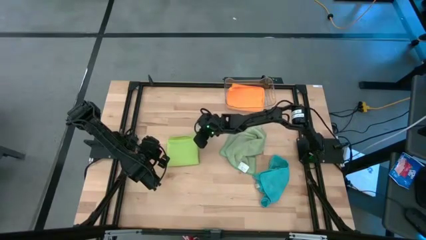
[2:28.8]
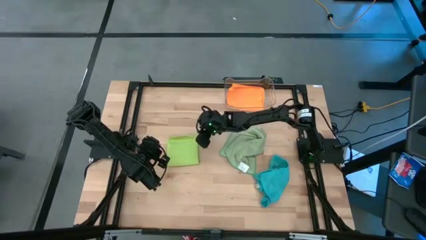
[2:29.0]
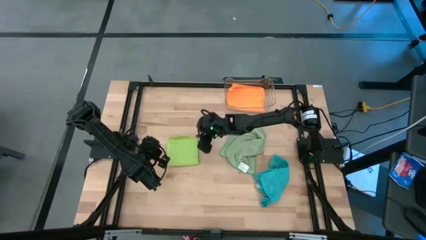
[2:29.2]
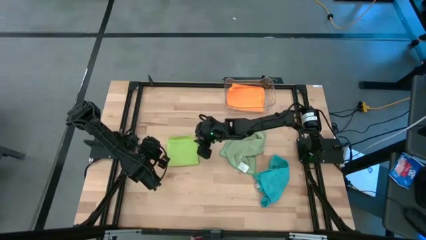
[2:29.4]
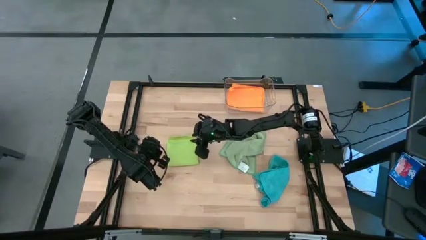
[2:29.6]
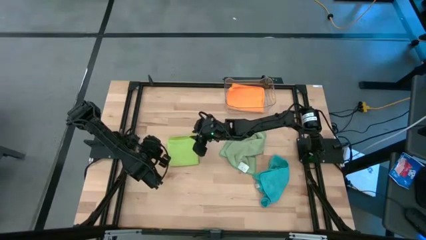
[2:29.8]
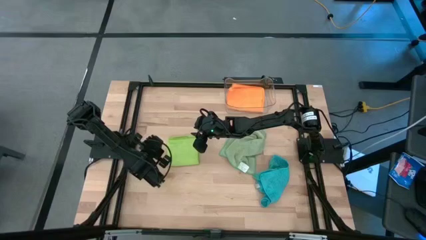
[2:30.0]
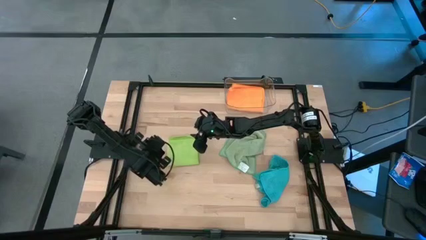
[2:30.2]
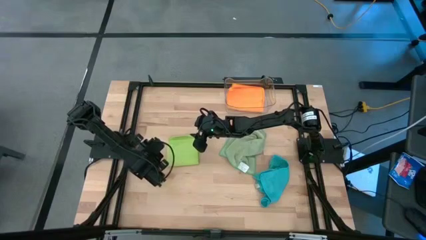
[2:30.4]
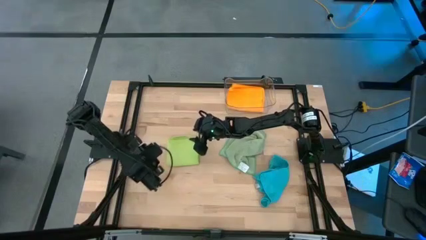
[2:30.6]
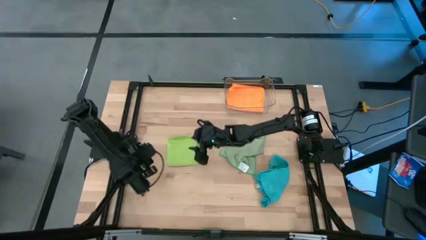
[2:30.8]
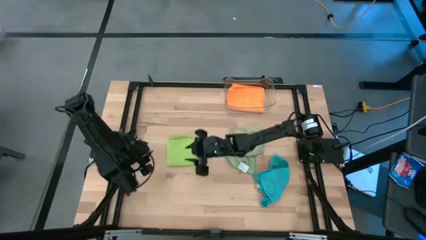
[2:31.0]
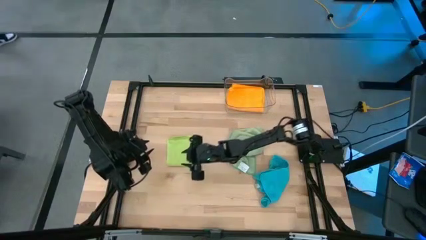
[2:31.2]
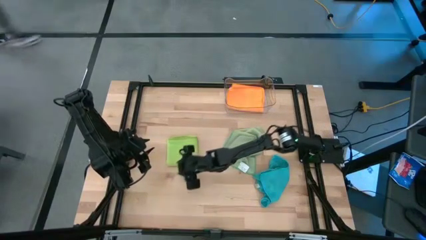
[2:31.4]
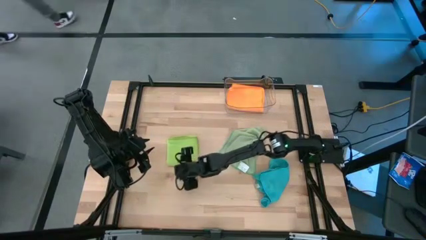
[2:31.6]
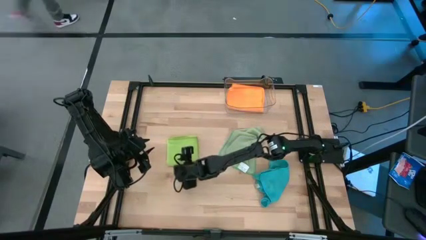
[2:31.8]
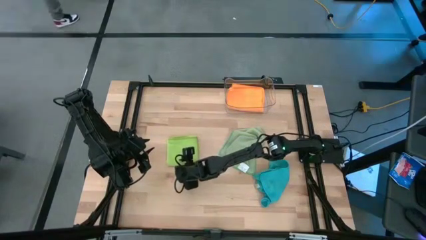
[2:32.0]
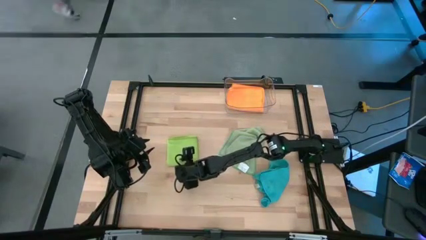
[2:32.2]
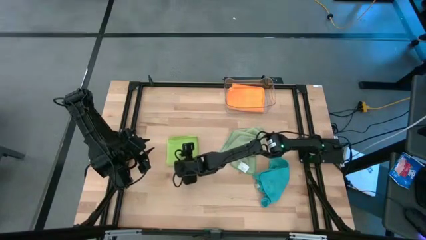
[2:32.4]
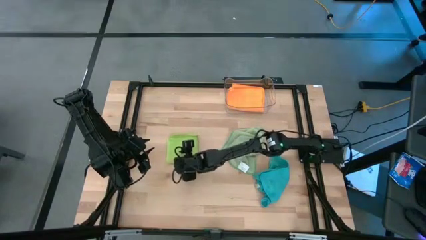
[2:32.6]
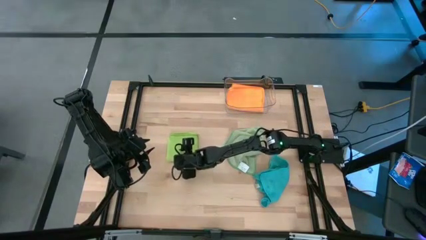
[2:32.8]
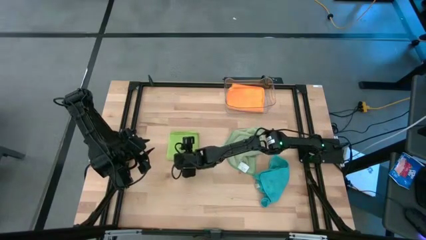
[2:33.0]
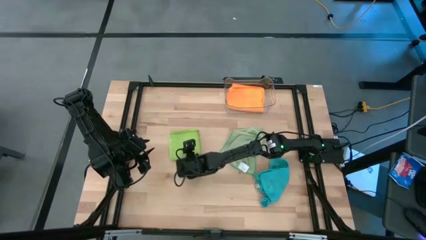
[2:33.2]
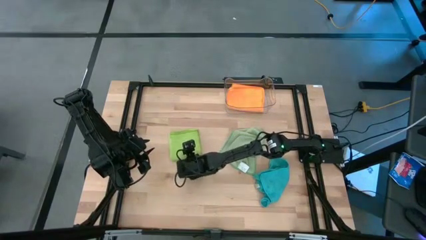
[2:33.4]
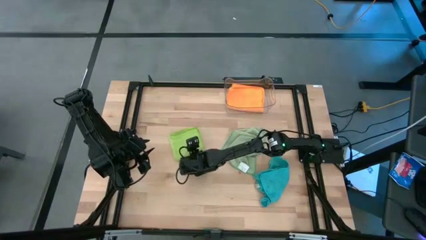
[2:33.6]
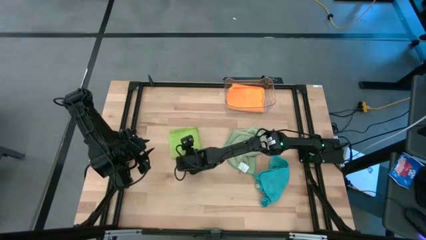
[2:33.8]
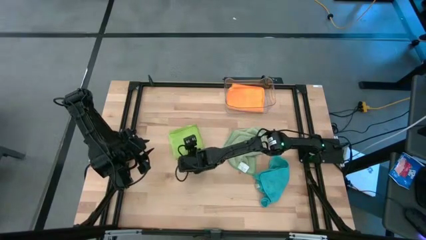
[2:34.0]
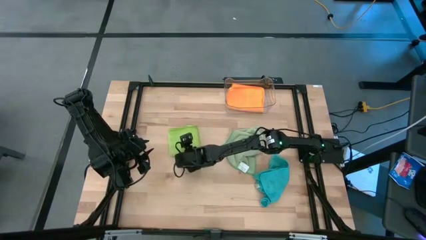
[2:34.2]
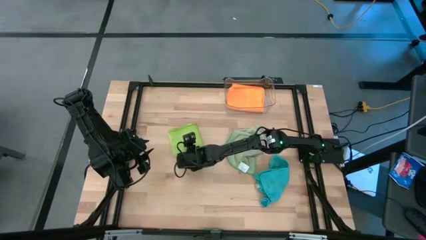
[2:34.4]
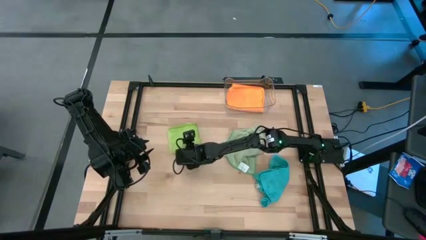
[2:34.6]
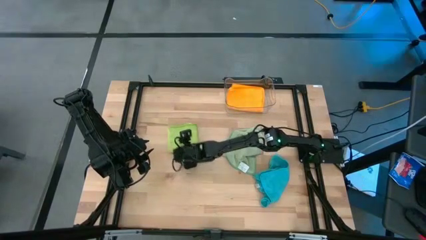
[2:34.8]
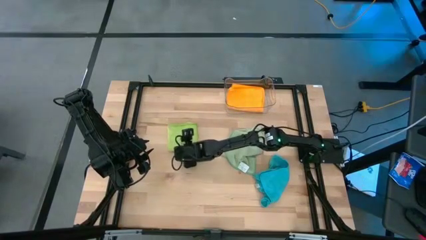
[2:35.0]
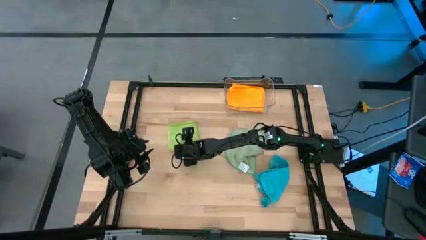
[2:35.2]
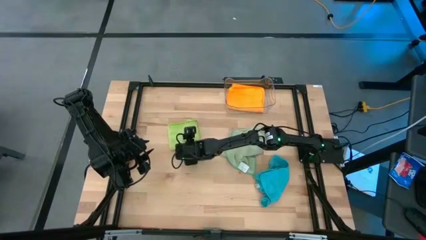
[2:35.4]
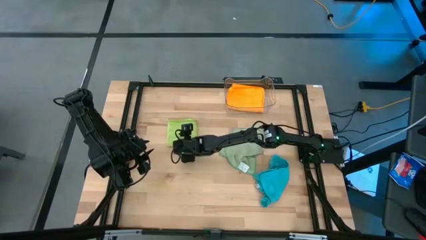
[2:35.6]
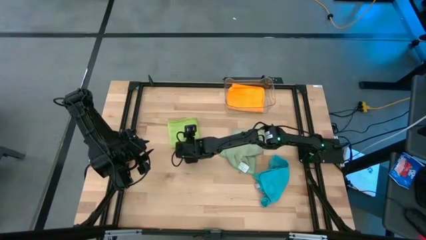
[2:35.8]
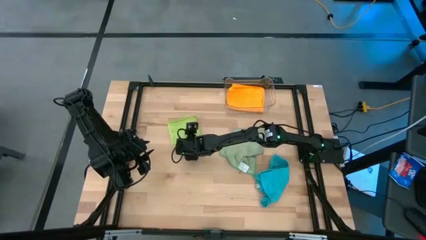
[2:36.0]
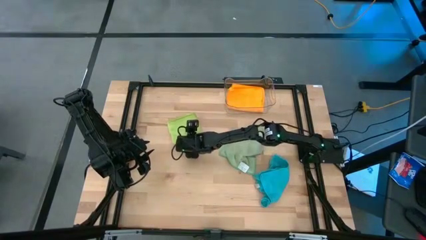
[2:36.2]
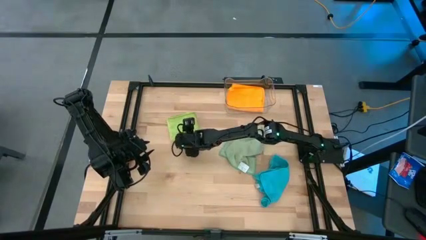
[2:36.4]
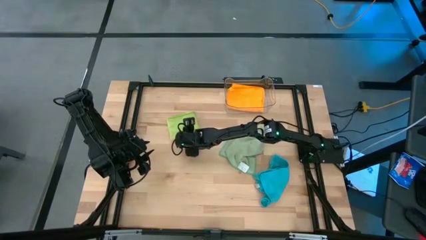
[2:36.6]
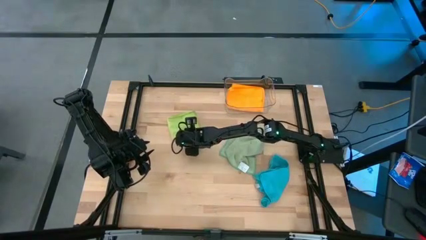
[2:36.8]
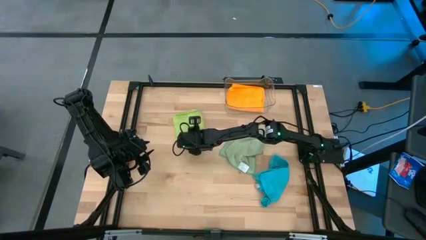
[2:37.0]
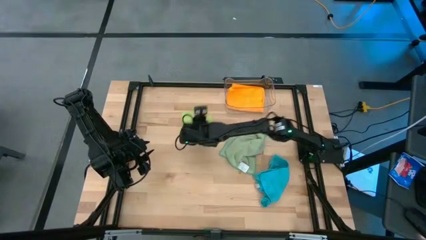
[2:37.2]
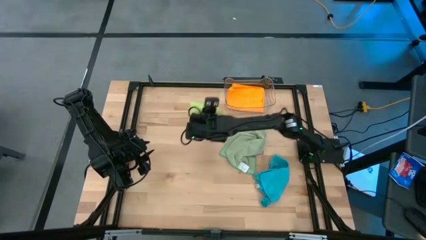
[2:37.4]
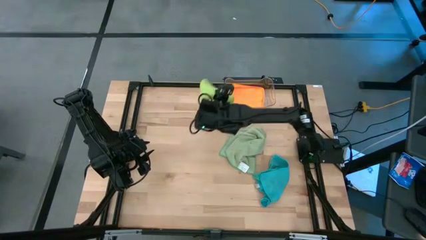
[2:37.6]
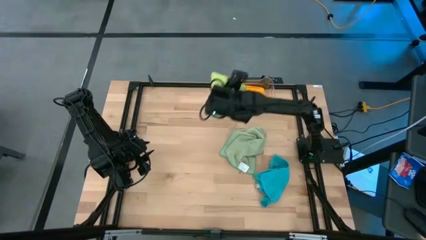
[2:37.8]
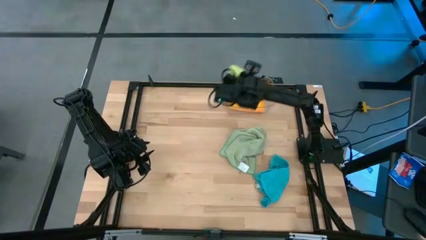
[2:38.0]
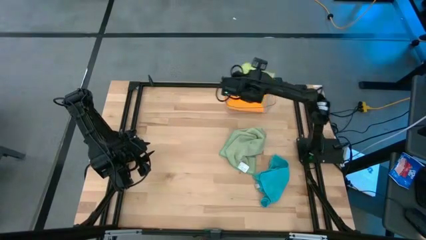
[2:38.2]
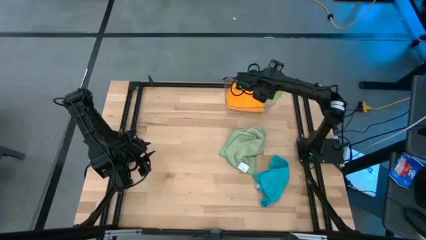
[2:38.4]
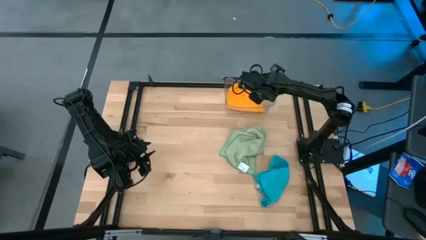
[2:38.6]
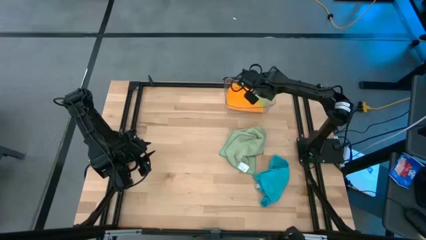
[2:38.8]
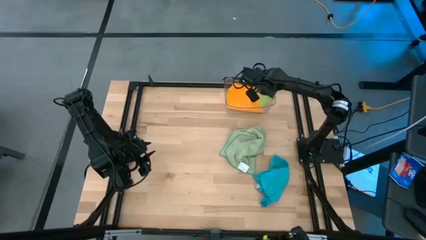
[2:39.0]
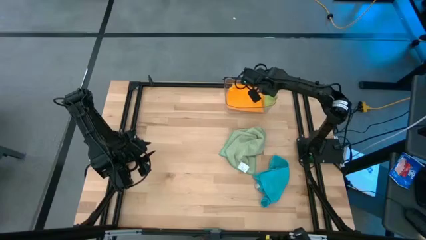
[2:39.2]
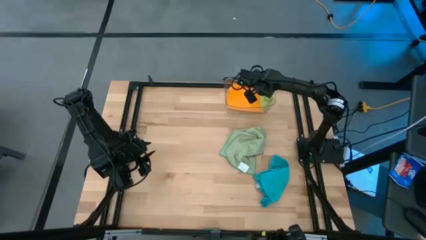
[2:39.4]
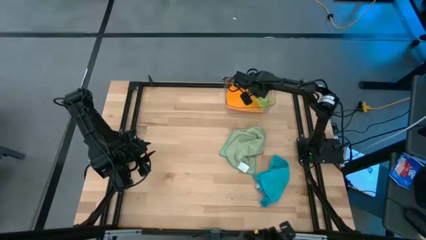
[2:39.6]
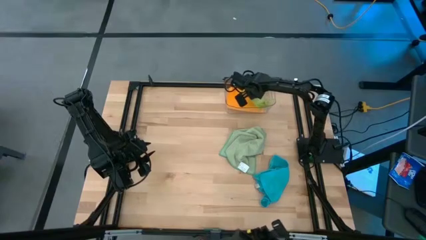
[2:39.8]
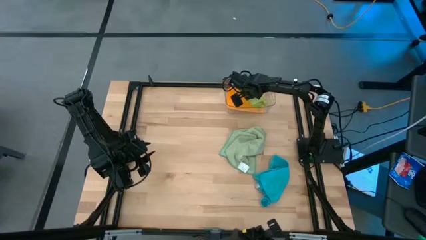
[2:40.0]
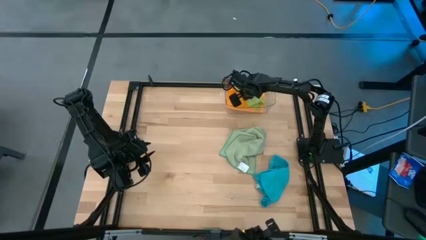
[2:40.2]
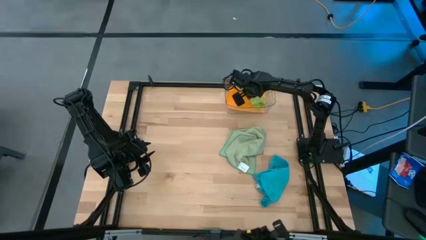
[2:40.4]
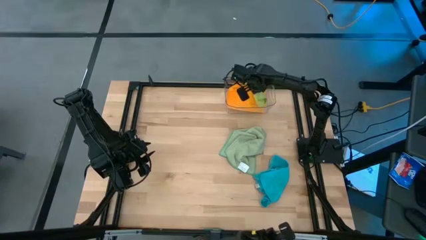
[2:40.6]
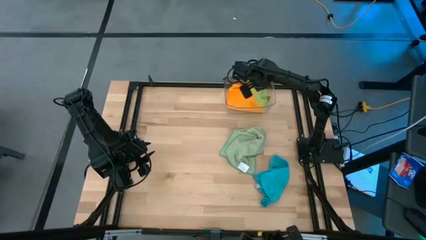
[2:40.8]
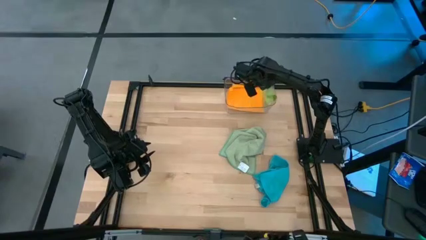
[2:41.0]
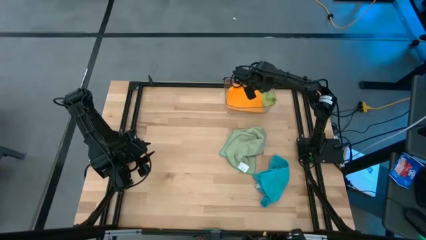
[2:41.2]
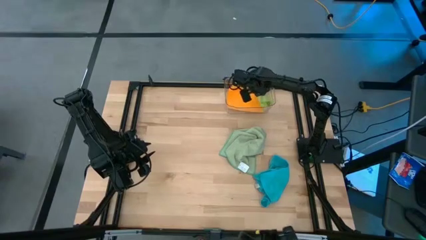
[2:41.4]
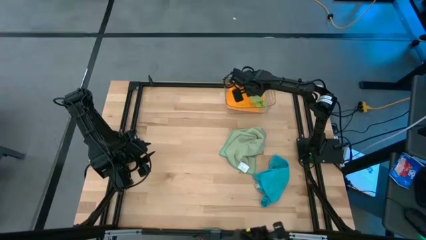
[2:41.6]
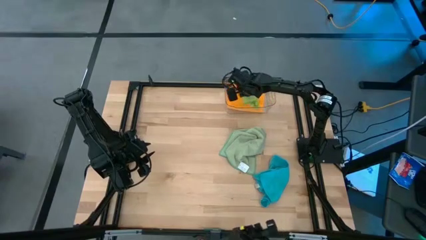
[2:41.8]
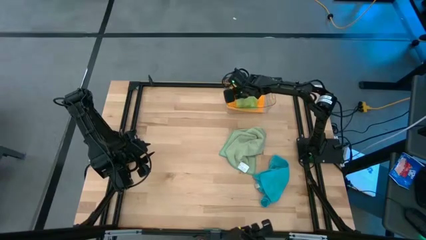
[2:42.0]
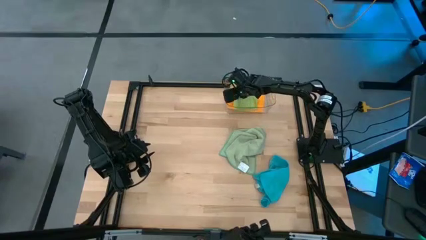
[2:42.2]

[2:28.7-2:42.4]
Task: Fold microfiber towels
Stack the light green microfiber towel on top of the orange microfiber towel in the transparent bin

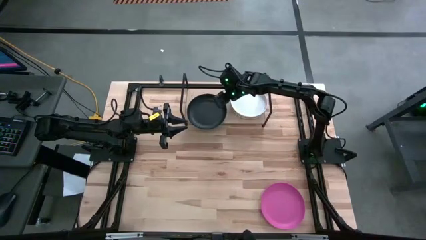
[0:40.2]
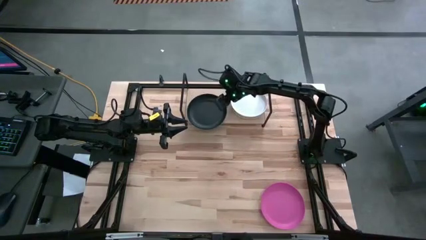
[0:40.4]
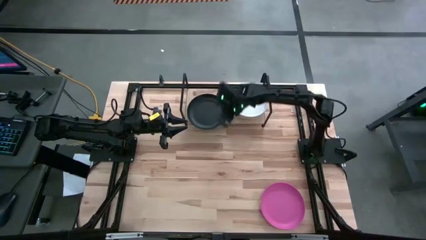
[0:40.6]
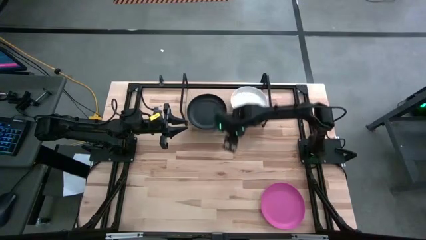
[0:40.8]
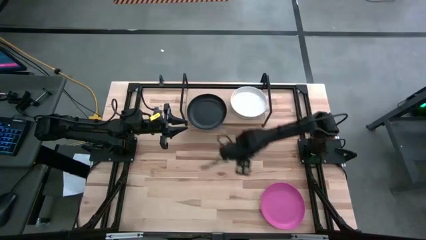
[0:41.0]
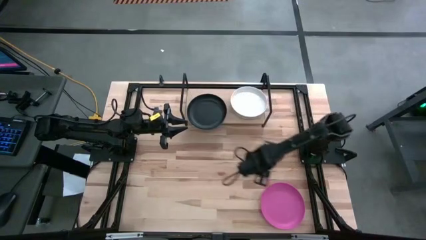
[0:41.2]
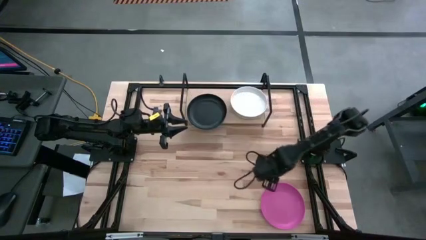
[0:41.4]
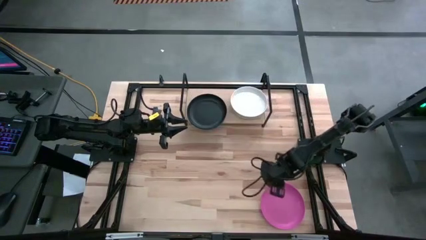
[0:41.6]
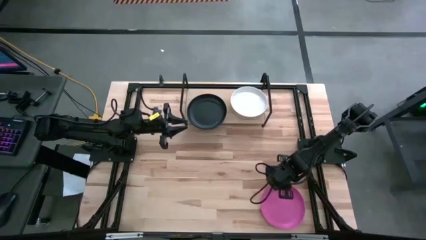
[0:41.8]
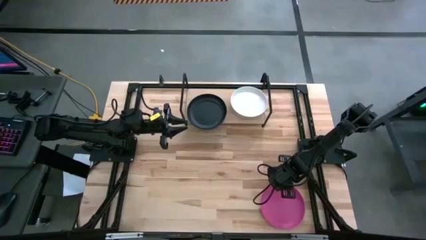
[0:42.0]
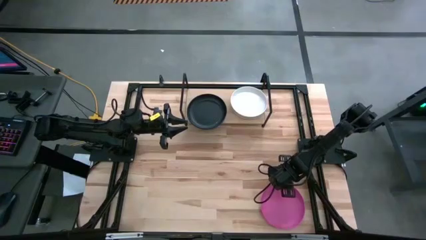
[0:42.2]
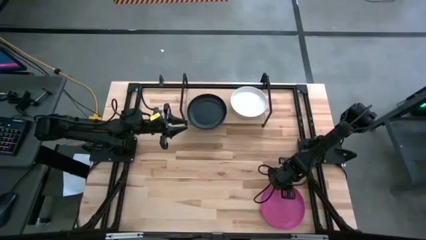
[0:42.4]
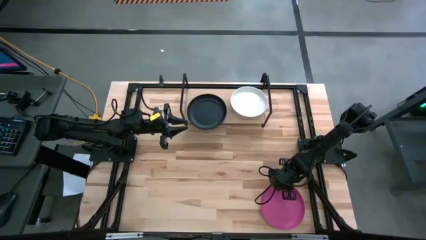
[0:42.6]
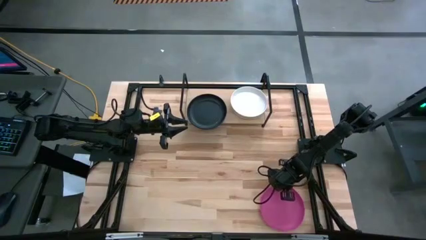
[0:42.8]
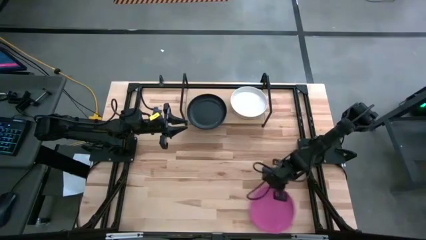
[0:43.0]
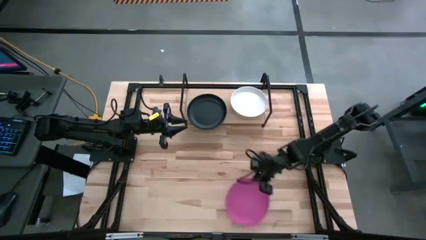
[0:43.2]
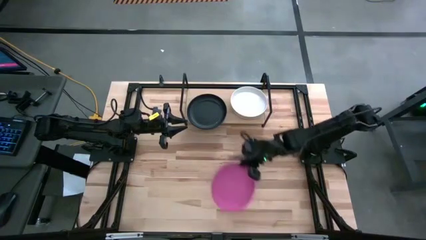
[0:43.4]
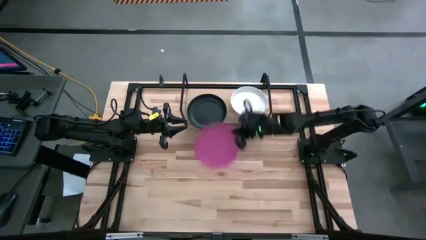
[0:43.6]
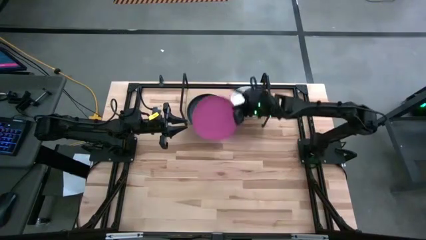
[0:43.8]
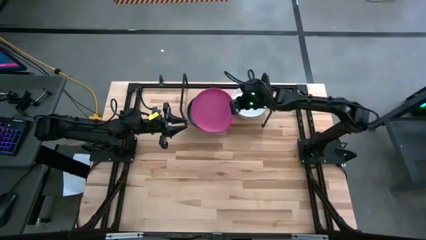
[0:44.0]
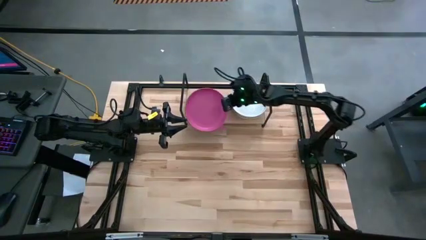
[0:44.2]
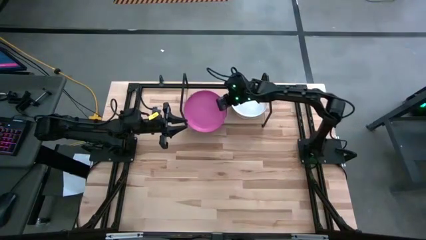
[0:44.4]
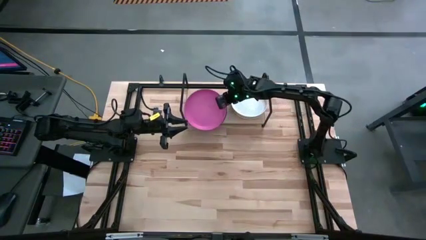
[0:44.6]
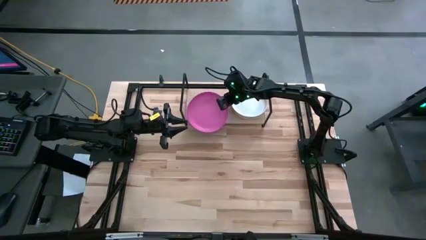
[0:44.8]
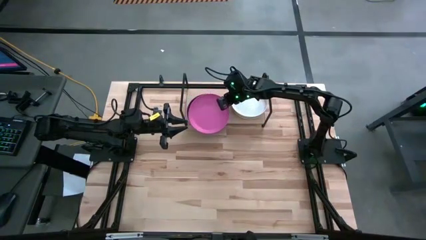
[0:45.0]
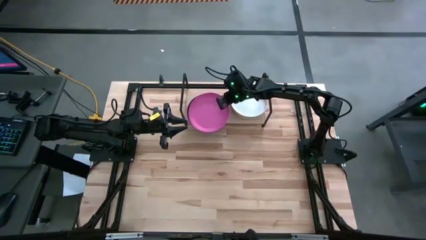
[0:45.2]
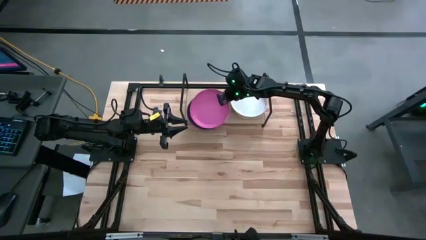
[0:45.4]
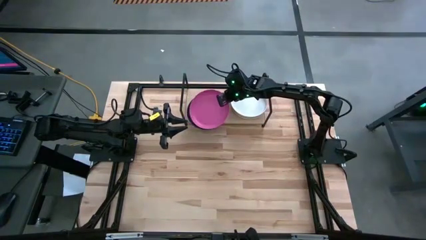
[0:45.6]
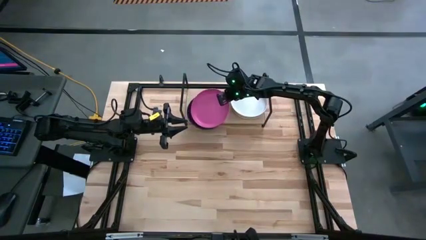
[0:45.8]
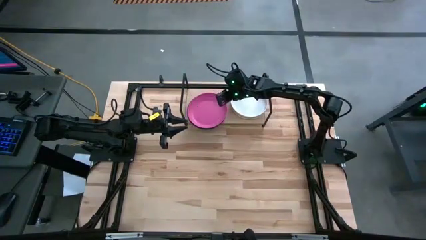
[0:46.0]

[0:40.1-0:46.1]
Task: Place and stack plates onto a shelf
Stack the pink plate on top of the black plate on the shelf
